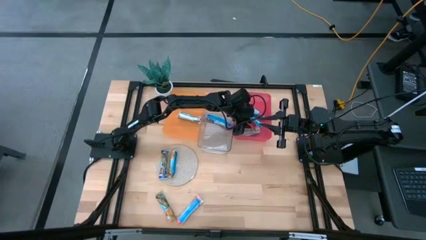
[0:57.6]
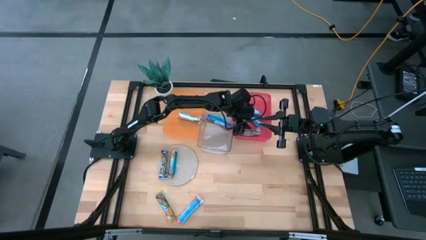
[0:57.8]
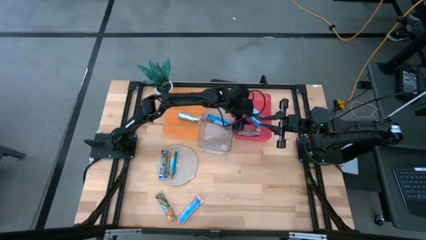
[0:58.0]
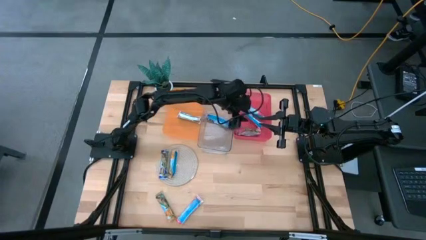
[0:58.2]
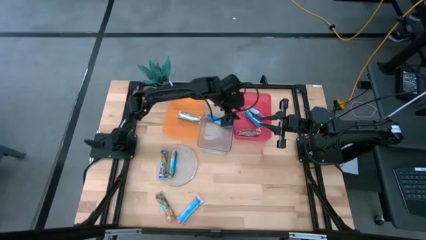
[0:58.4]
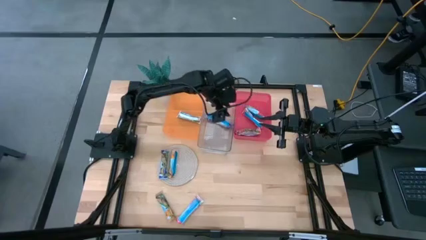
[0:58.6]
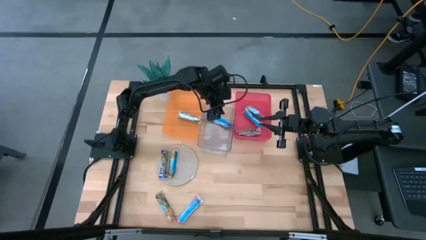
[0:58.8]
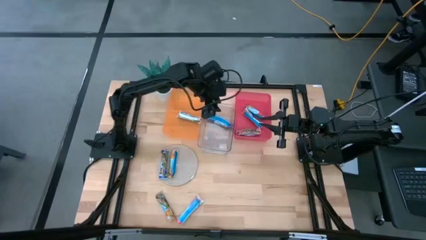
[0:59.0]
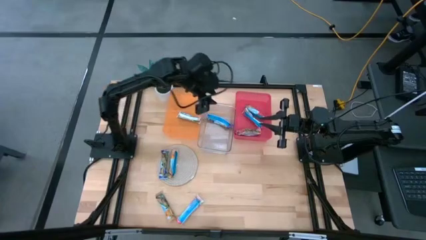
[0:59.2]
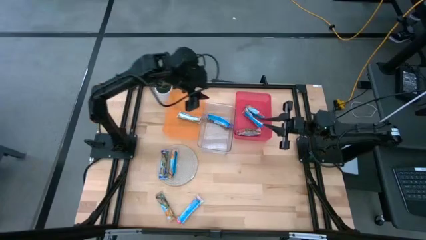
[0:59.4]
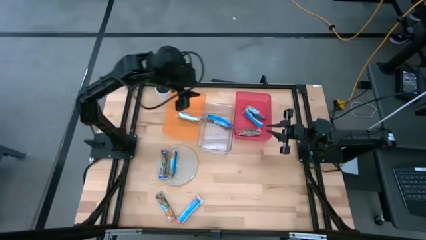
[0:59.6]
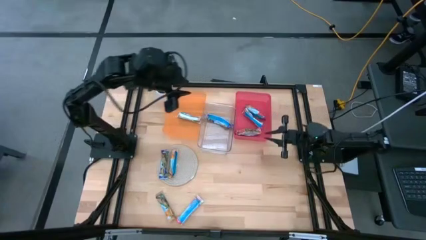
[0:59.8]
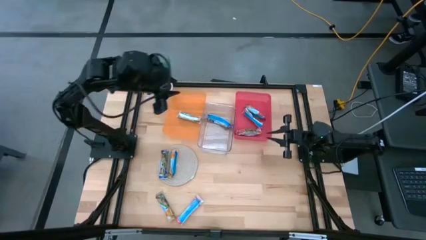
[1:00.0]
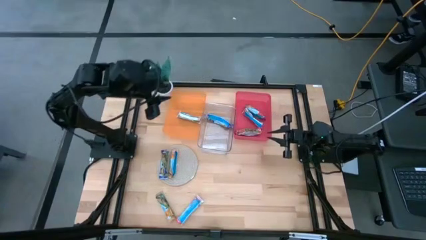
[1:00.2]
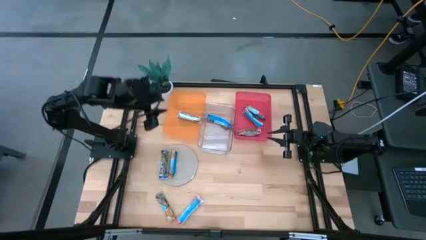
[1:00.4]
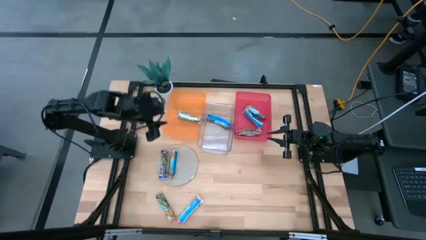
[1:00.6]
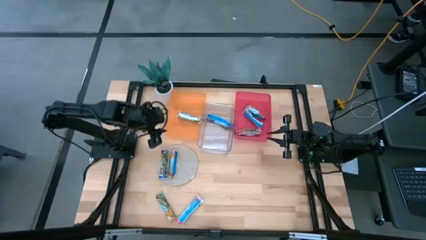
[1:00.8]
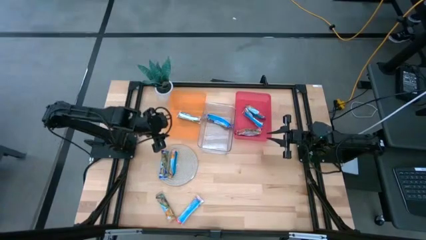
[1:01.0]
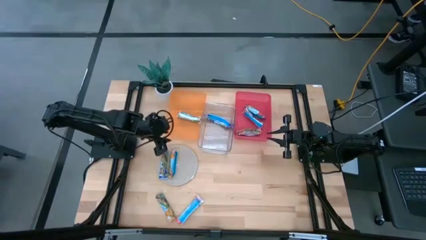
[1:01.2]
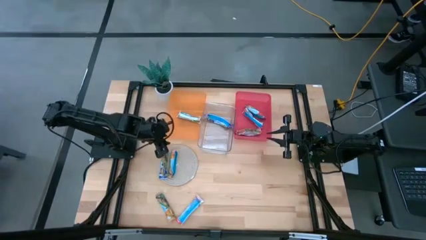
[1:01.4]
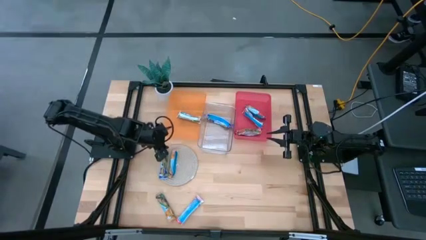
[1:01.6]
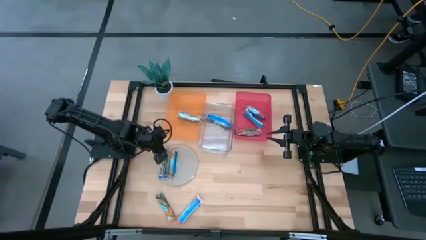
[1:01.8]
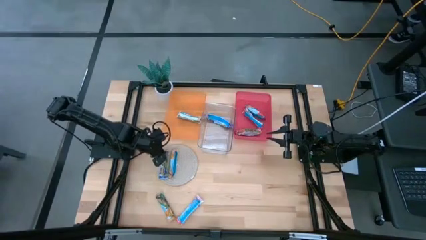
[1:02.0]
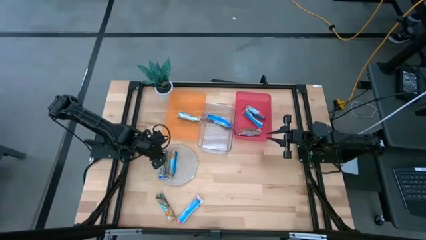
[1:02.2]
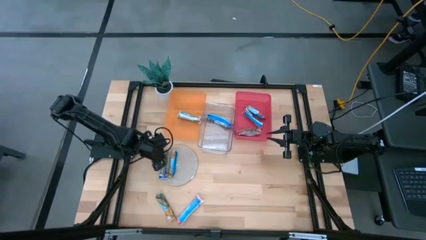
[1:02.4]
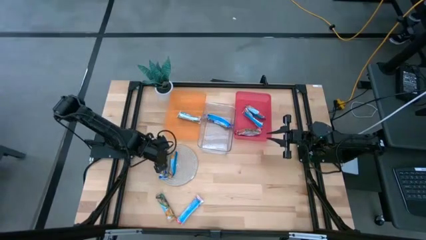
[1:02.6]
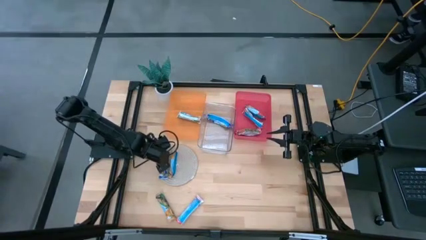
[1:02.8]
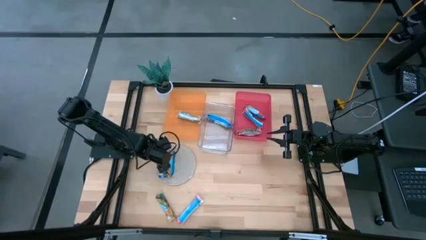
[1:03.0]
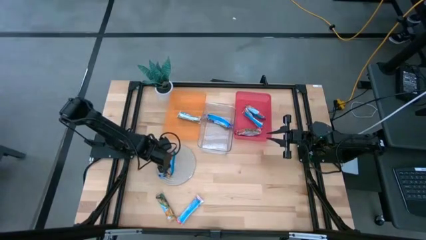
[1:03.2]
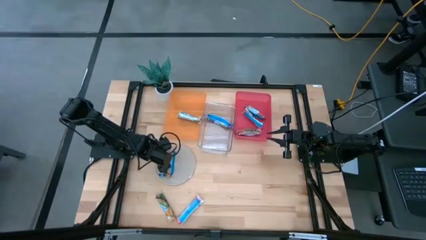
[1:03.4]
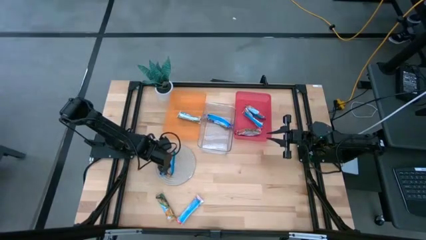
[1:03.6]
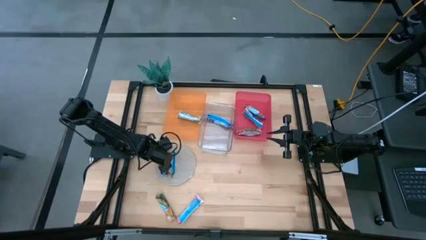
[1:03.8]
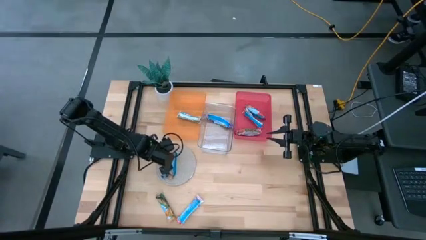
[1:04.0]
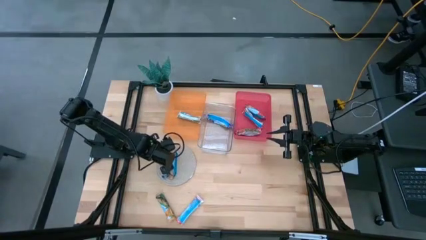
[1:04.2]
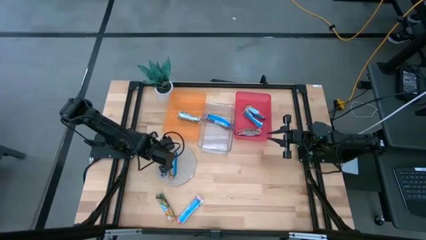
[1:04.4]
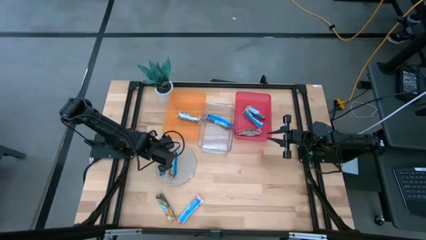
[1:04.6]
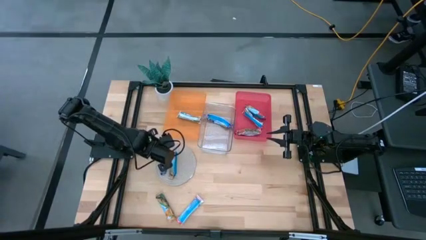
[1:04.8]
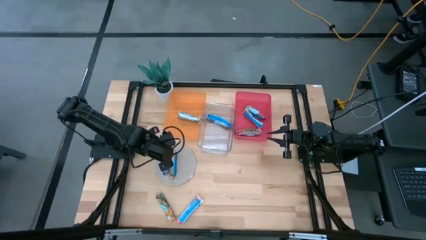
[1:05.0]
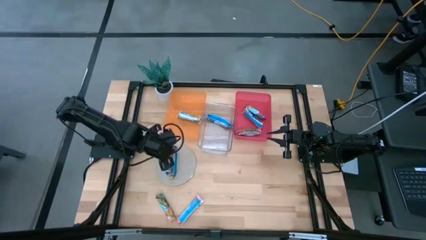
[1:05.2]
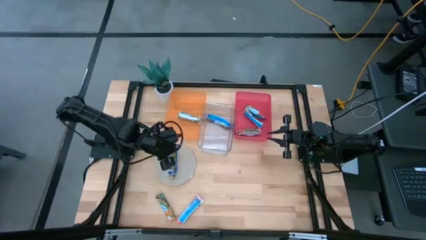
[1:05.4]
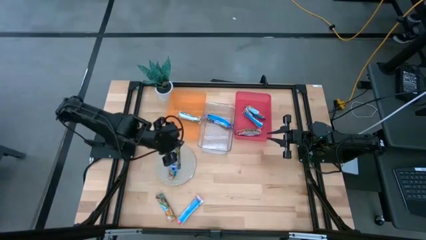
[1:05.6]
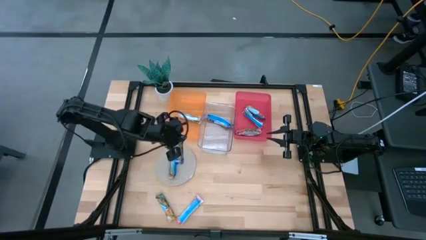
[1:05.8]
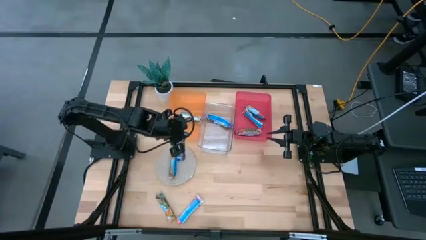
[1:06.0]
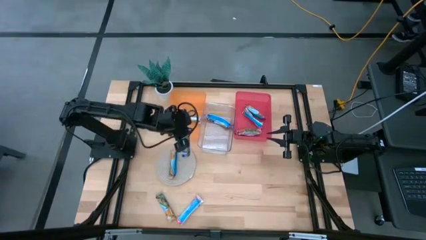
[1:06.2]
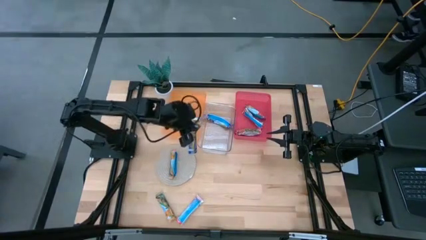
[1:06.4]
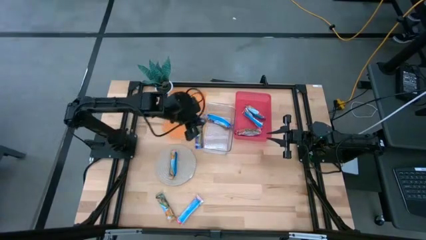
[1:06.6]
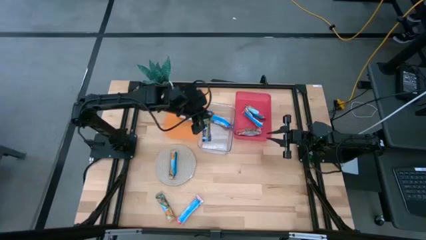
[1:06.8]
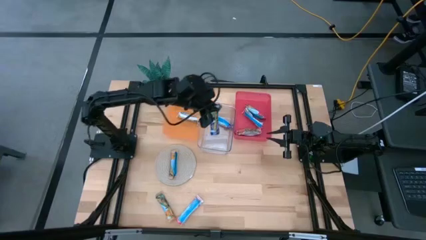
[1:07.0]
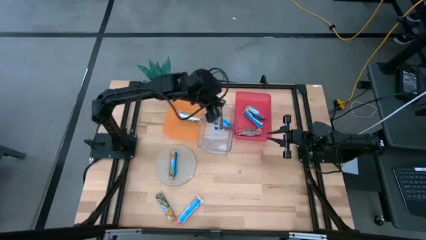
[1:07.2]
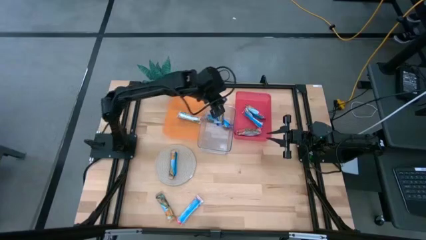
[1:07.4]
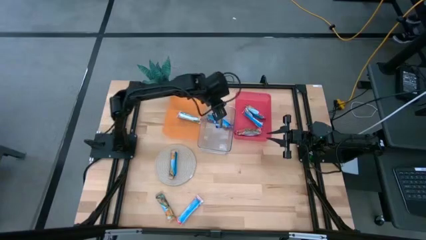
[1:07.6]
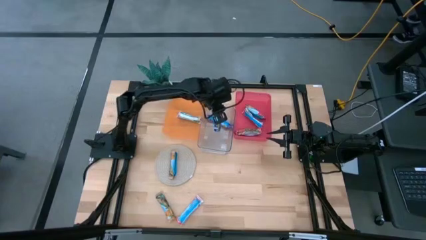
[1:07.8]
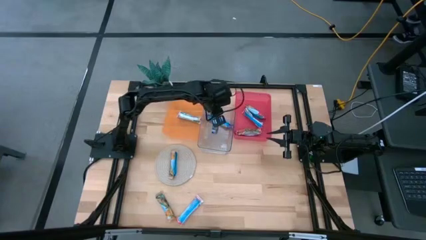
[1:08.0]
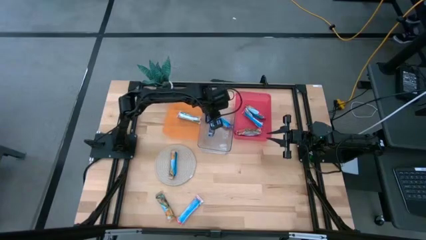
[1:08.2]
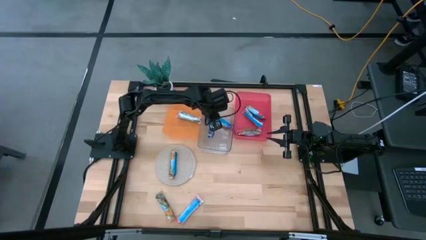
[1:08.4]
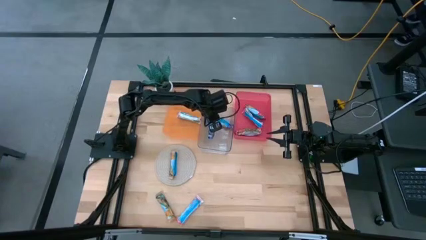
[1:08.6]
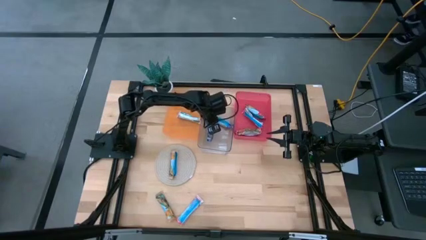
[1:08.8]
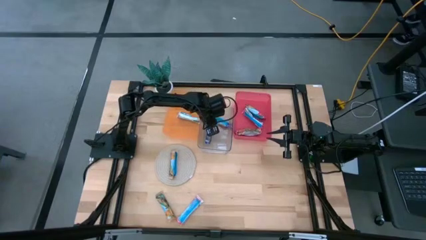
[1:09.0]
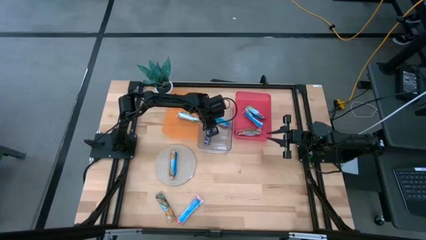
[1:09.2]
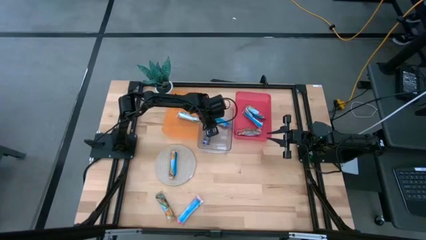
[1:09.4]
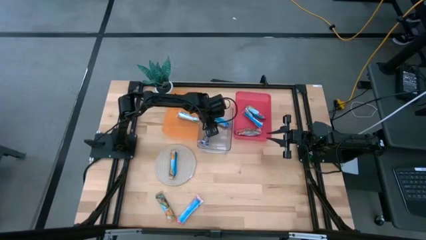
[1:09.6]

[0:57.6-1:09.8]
Task: Pick and place Granola Bars by type
Put the blue granola bar into the transparent bin
